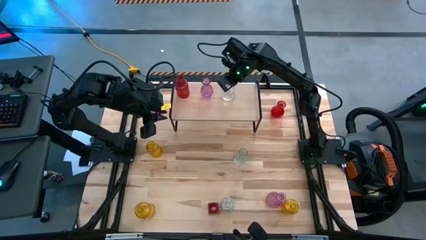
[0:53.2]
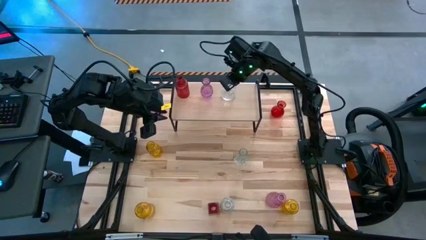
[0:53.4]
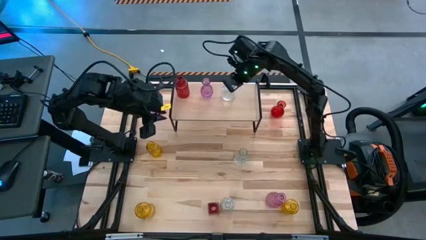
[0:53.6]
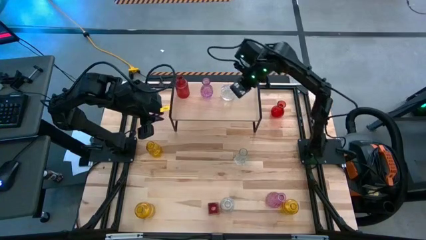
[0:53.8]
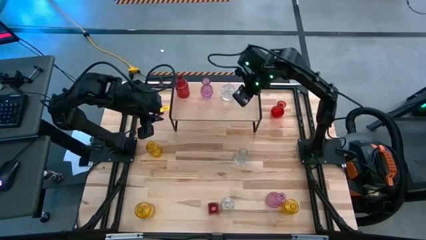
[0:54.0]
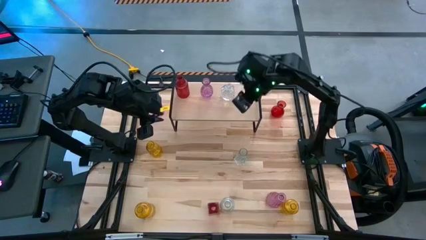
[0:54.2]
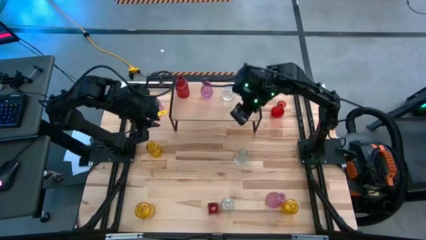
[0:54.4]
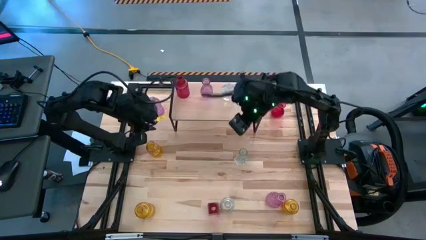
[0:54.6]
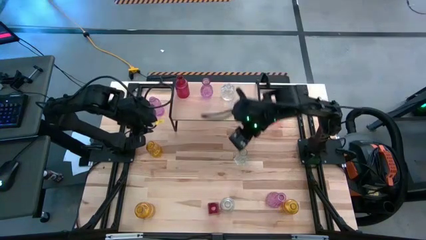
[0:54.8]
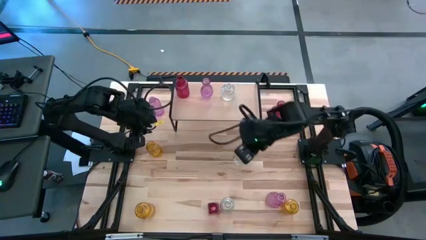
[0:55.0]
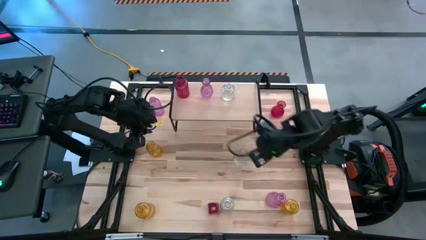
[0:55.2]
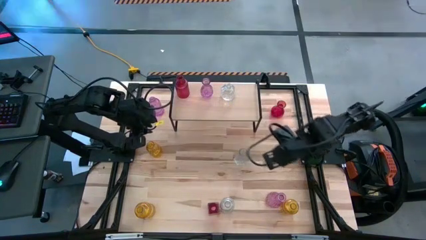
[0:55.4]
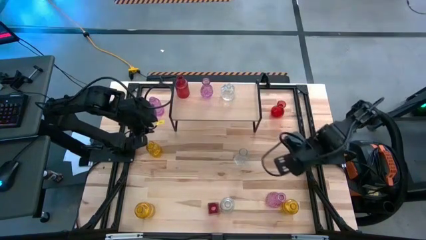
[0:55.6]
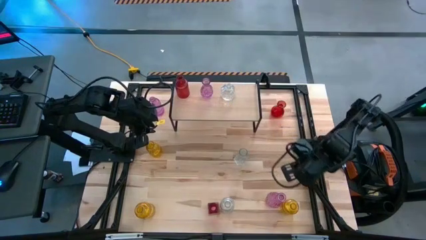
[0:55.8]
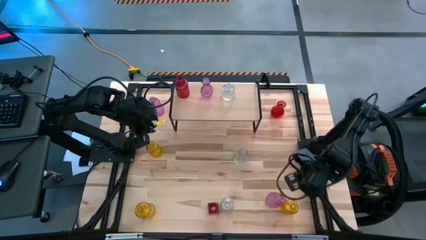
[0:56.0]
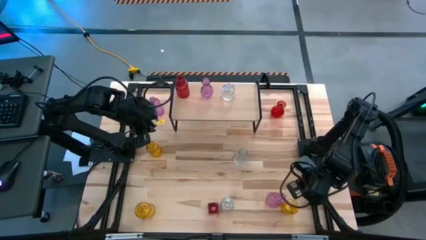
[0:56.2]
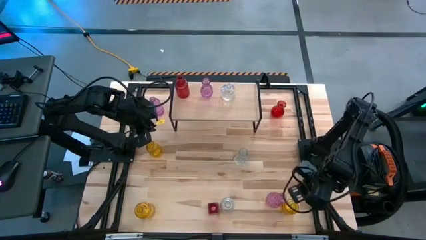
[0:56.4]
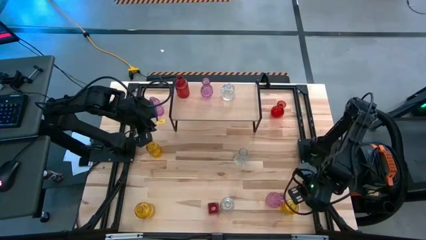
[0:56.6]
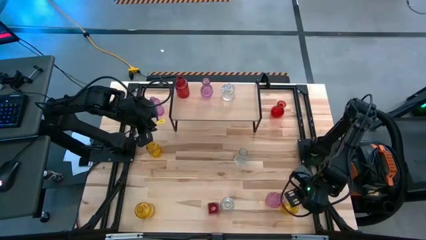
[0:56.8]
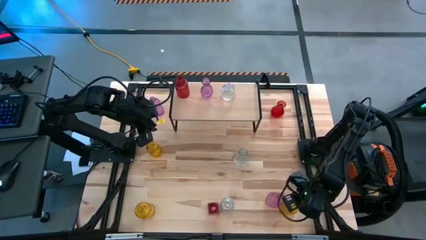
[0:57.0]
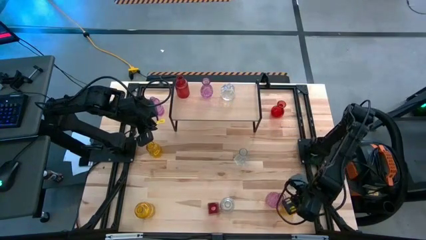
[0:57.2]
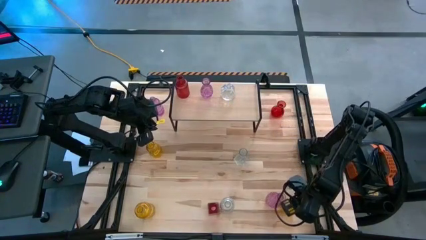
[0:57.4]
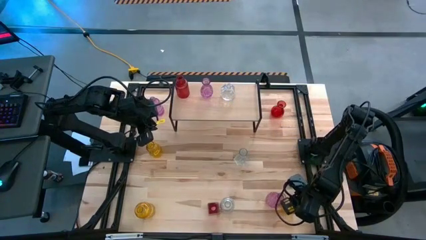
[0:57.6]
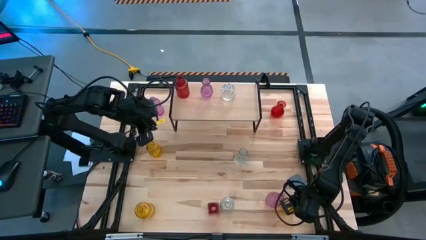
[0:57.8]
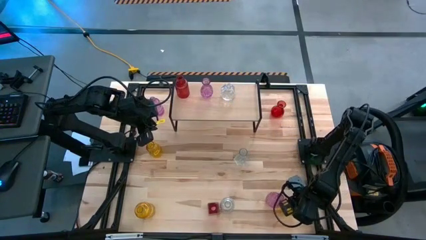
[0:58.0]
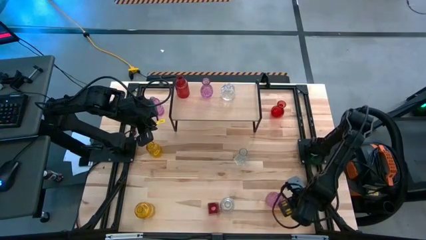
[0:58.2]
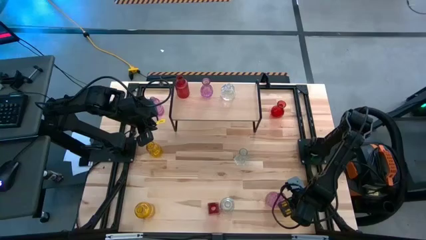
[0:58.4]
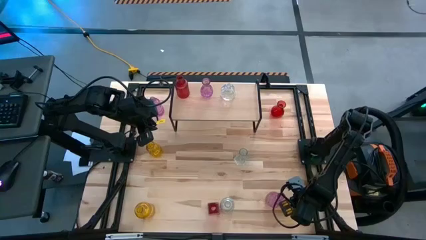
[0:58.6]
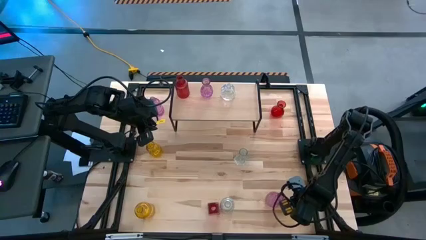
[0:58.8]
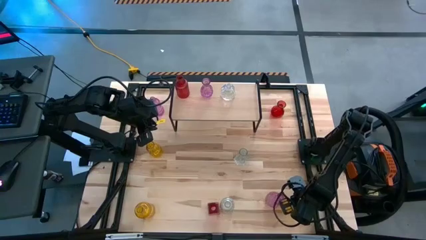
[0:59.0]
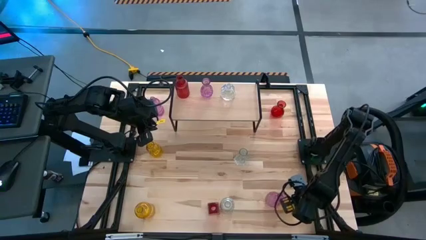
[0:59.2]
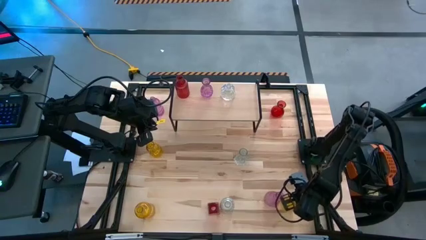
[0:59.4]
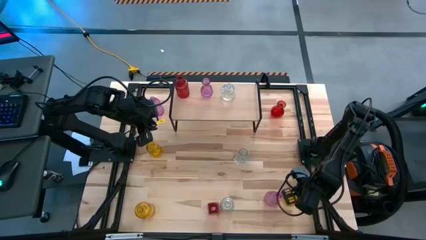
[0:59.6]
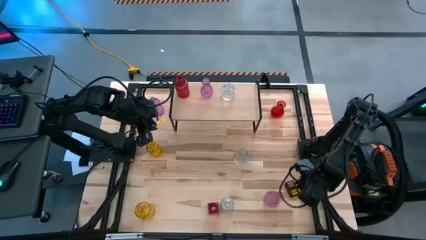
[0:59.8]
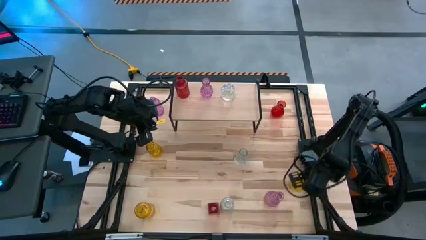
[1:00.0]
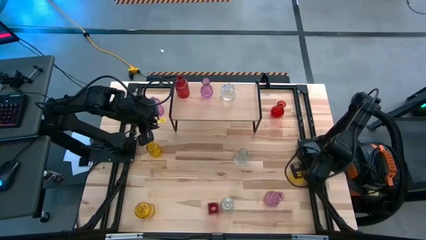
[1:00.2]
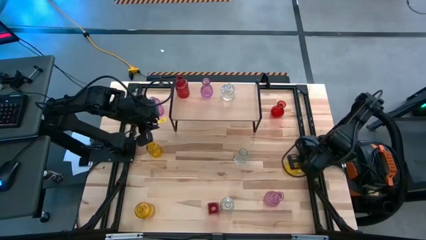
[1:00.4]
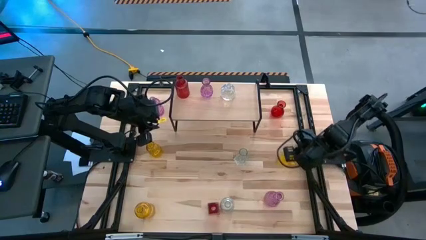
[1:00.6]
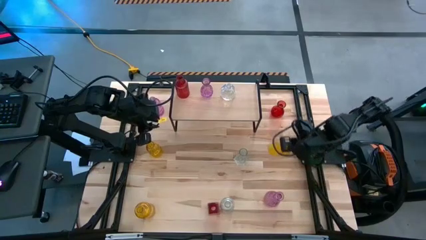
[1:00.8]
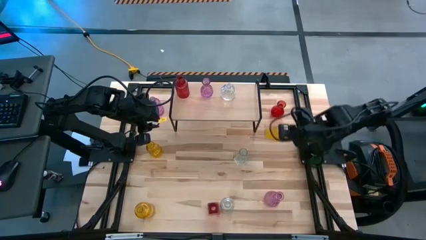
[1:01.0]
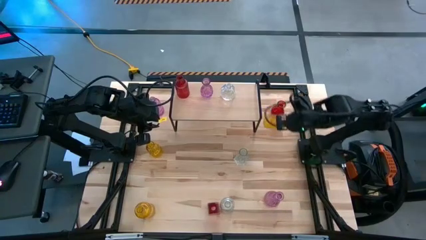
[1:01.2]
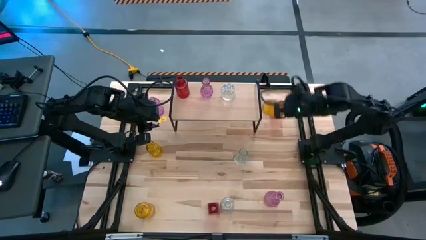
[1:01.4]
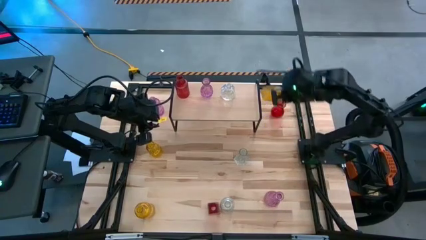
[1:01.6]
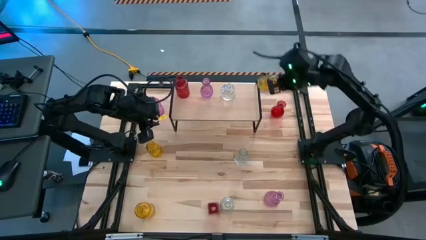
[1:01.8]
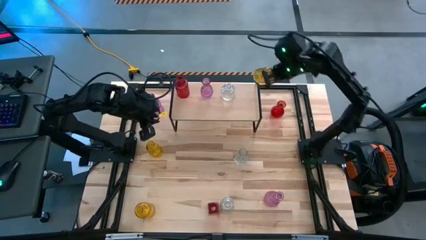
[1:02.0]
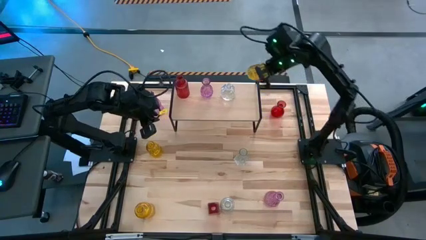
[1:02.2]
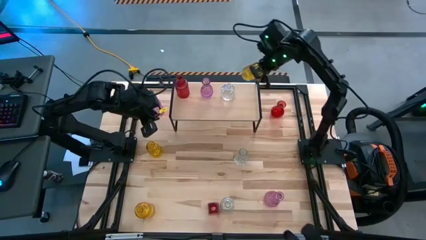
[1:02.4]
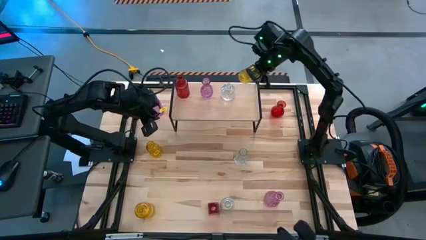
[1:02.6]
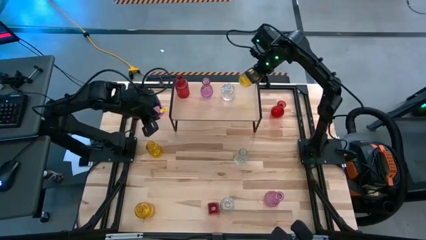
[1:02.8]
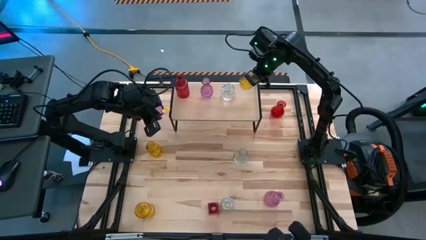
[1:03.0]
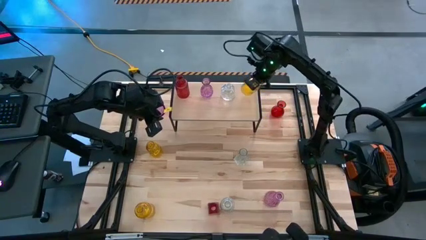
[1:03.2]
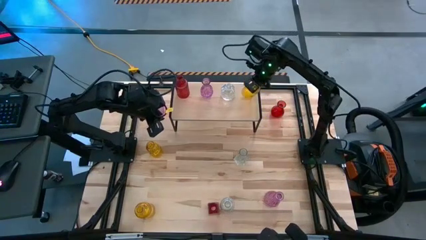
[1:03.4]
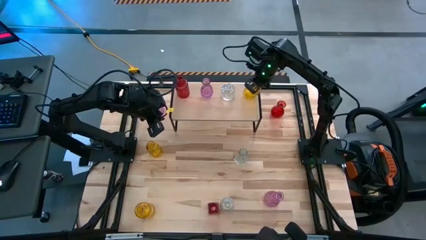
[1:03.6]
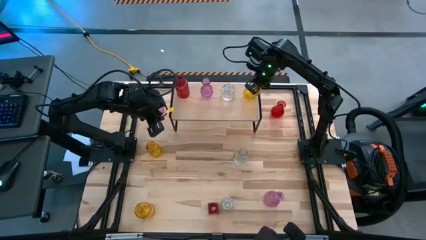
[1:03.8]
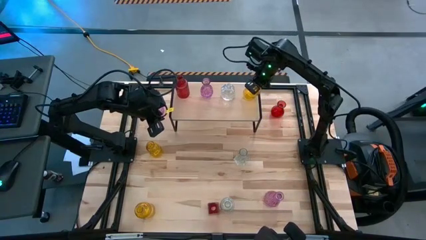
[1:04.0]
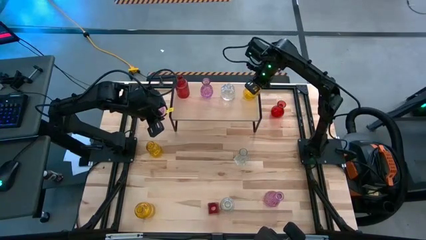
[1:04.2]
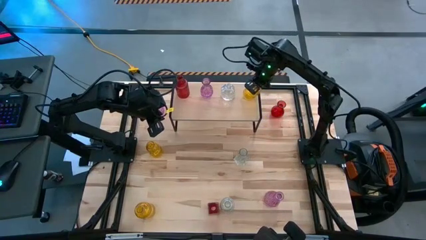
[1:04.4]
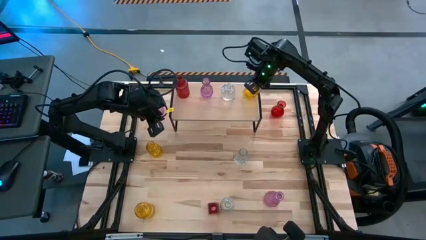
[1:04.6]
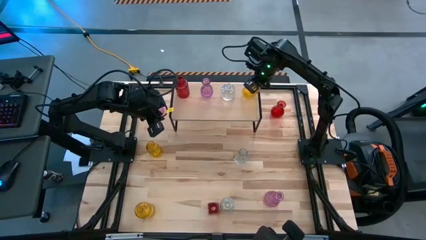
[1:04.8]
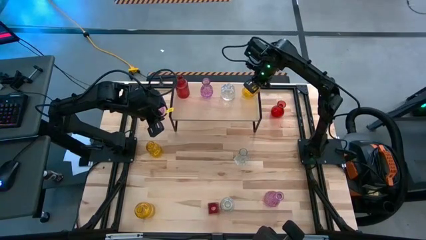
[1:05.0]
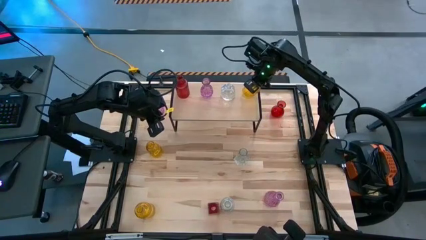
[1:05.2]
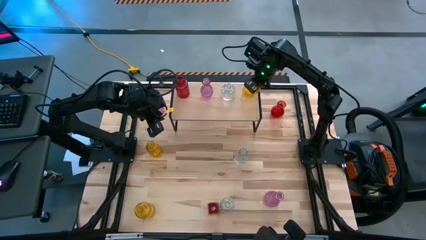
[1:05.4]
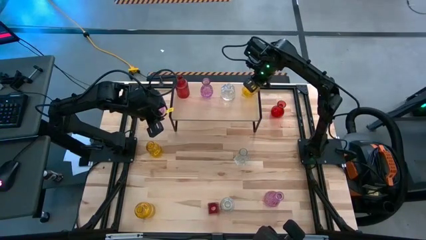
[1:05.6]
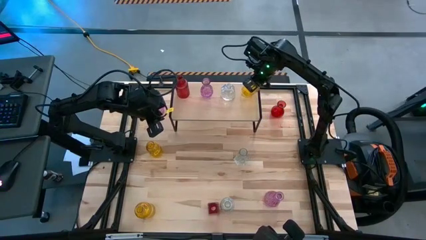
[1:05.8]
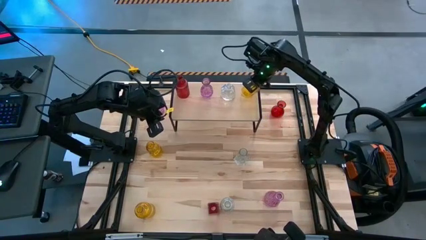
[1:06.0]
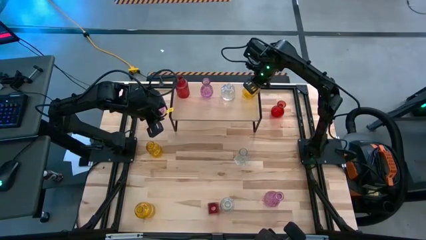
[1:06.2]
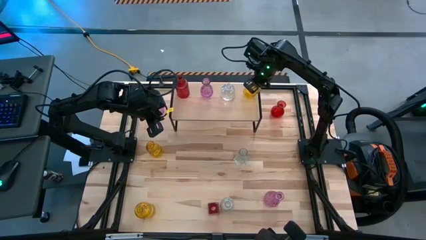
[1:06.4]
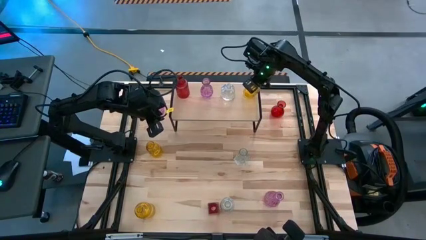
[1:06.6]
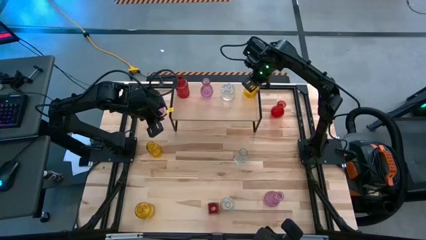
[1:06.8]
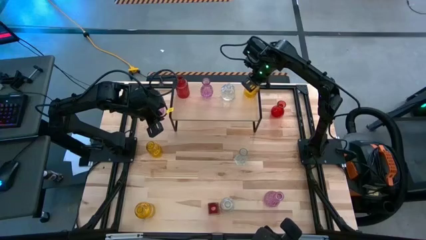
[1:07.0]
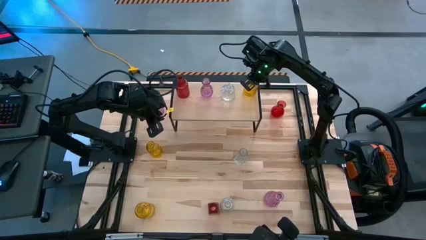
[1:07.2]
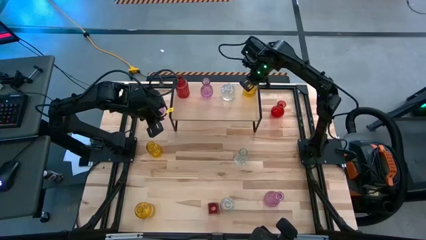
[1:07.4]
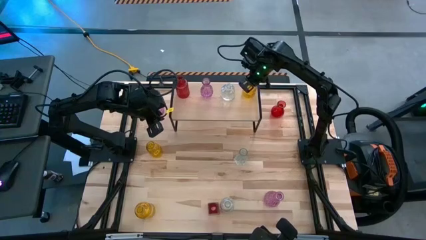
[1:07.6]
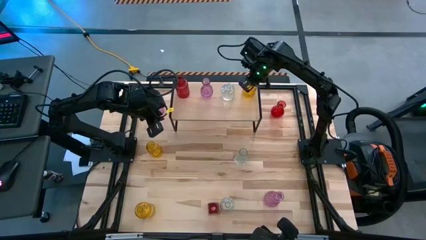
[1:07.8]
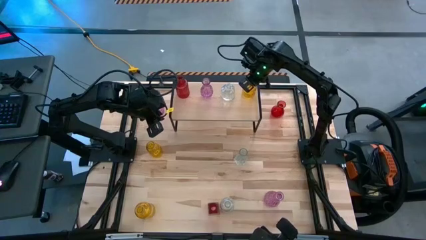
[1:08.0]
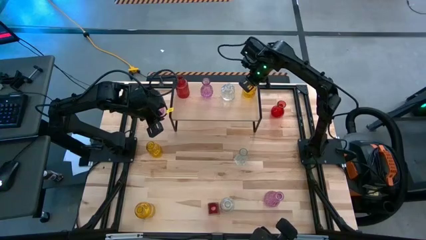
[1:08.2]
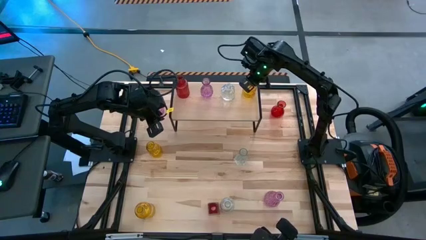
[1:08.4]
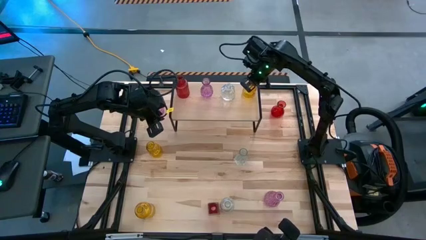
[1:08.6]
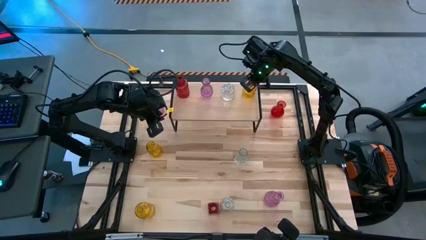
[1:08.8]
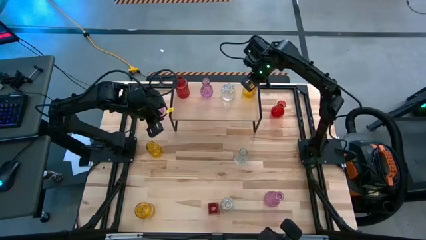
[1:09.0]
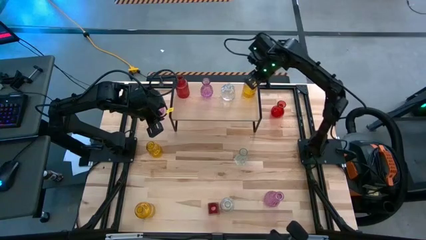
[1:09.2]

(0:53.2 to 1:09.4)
Task: sort vases onto shelf
Put the right yellow vase on the shelf
